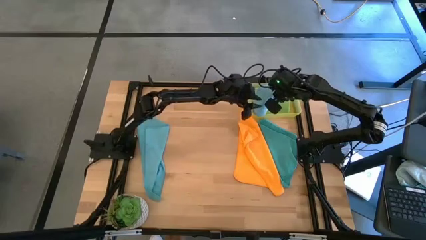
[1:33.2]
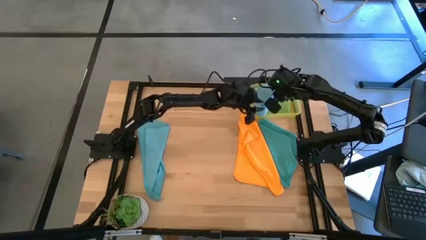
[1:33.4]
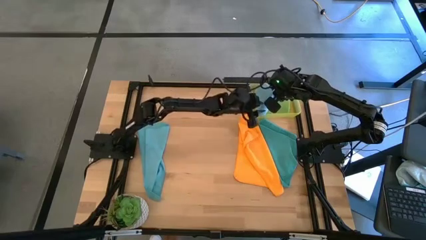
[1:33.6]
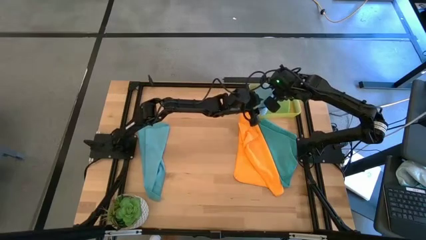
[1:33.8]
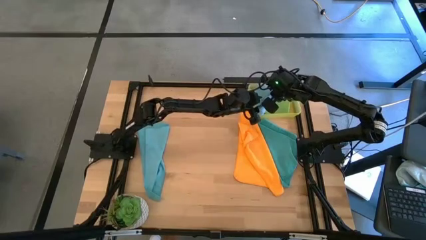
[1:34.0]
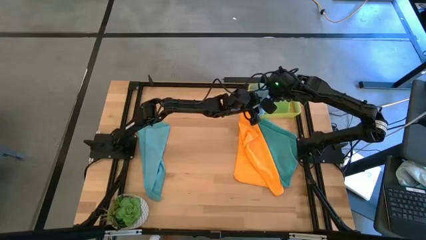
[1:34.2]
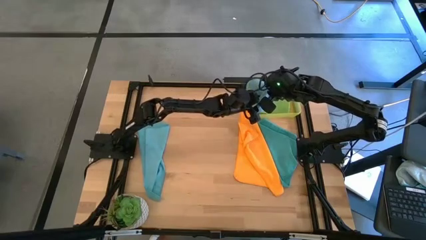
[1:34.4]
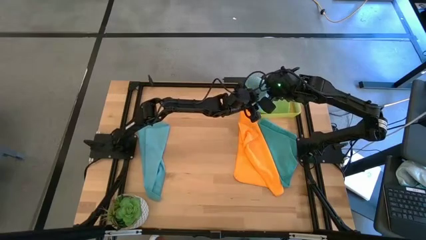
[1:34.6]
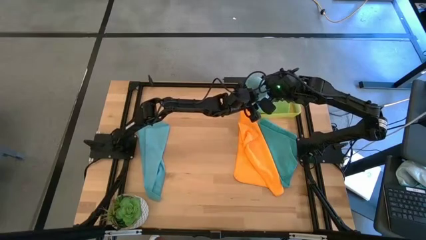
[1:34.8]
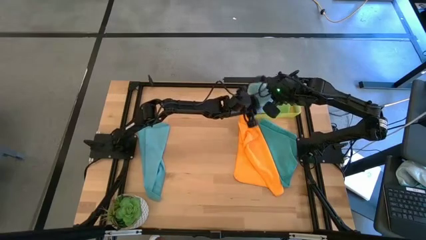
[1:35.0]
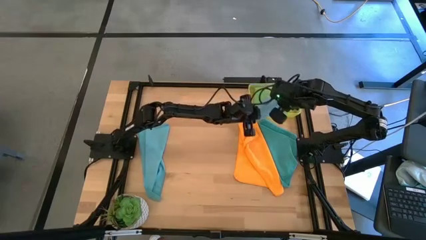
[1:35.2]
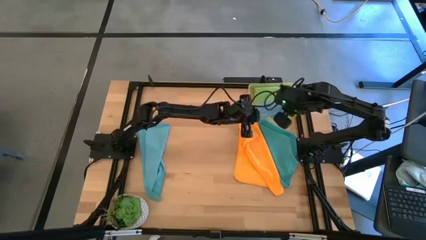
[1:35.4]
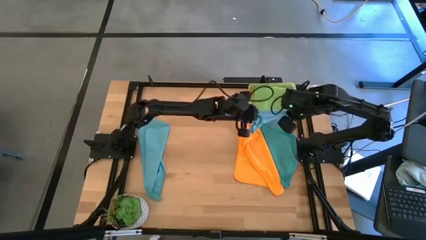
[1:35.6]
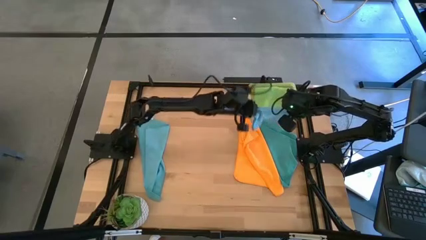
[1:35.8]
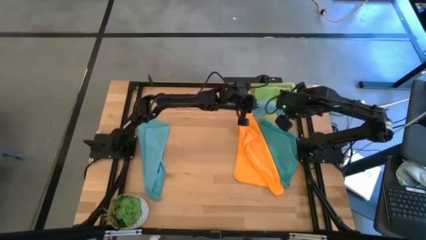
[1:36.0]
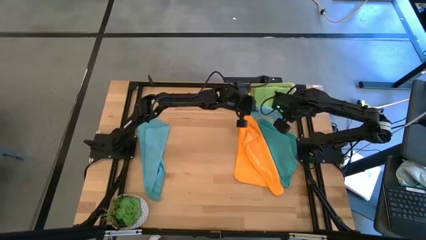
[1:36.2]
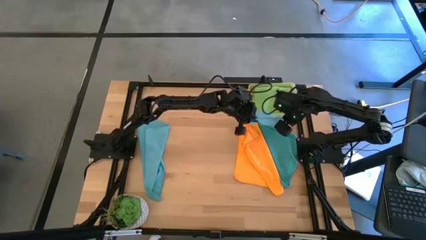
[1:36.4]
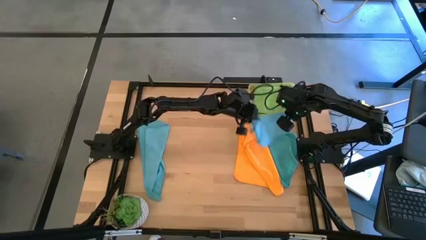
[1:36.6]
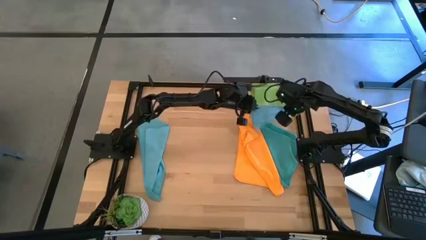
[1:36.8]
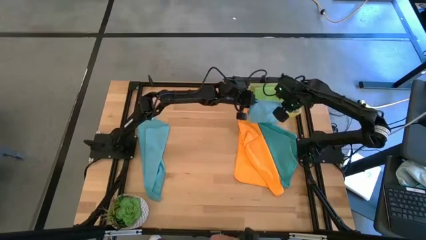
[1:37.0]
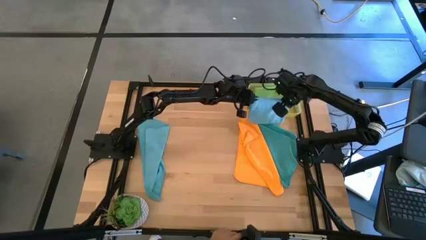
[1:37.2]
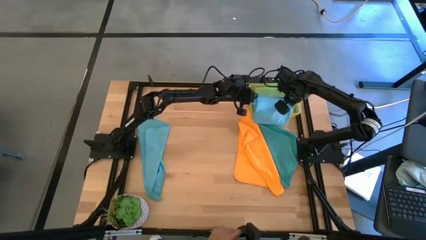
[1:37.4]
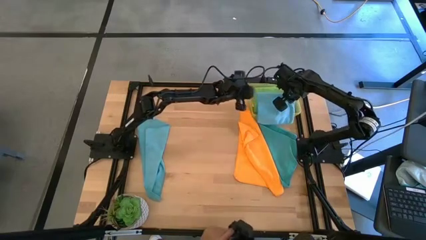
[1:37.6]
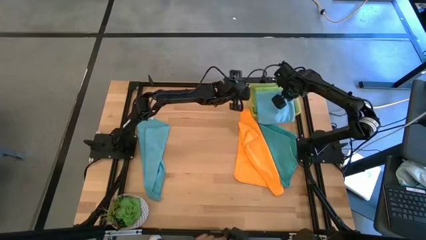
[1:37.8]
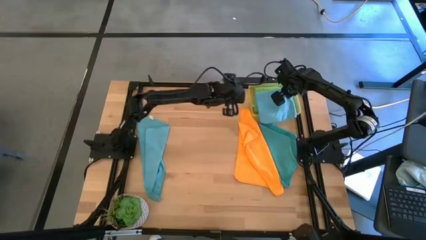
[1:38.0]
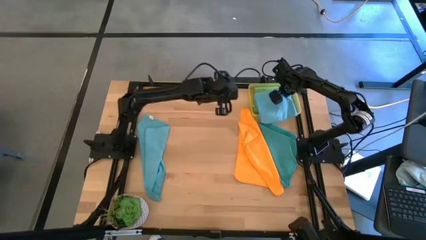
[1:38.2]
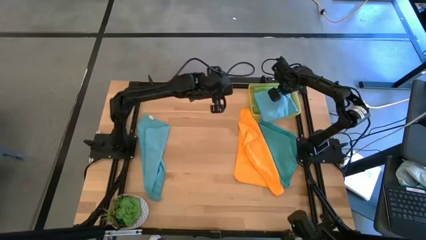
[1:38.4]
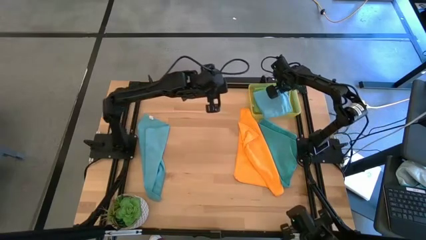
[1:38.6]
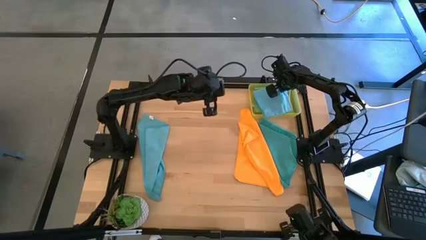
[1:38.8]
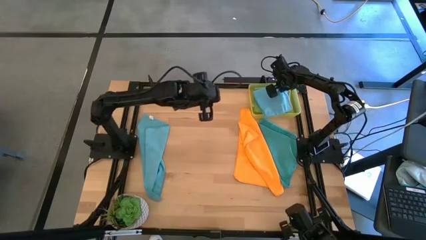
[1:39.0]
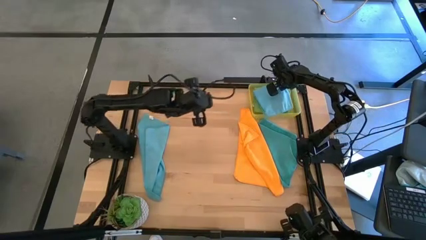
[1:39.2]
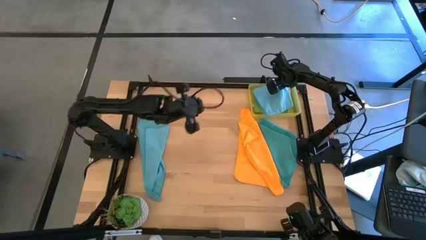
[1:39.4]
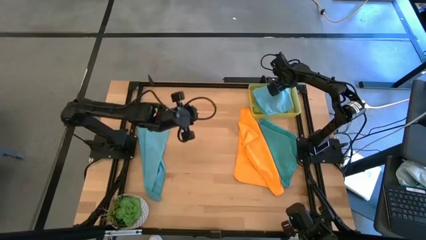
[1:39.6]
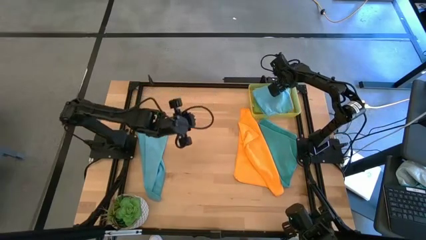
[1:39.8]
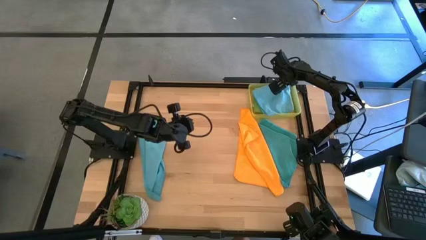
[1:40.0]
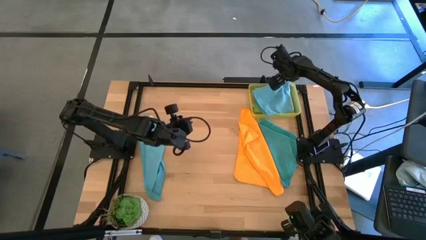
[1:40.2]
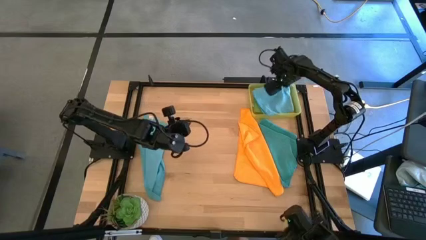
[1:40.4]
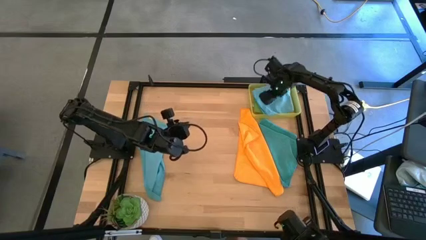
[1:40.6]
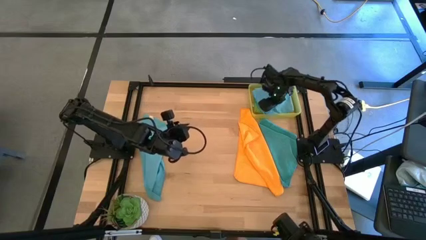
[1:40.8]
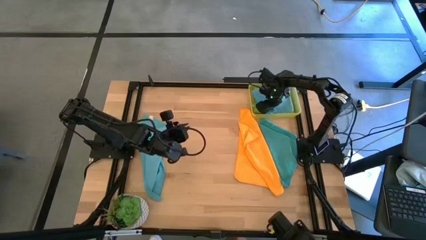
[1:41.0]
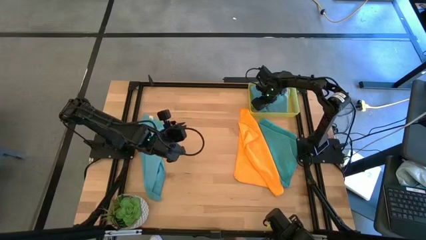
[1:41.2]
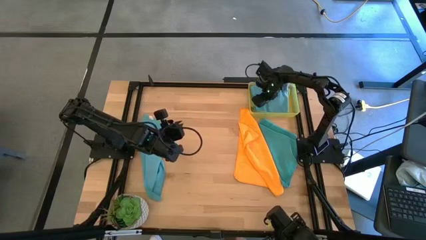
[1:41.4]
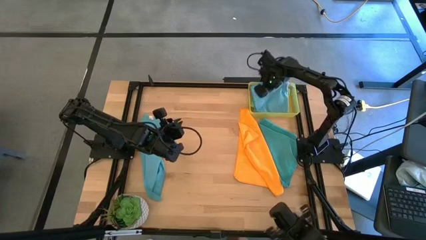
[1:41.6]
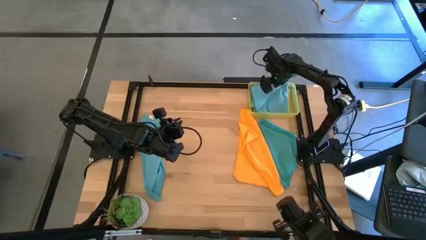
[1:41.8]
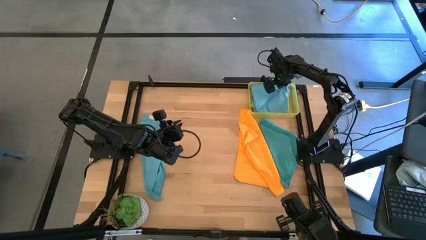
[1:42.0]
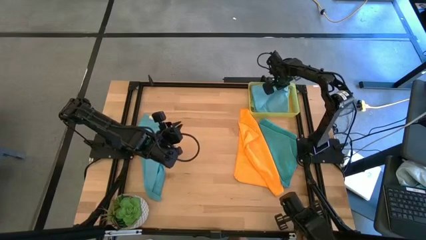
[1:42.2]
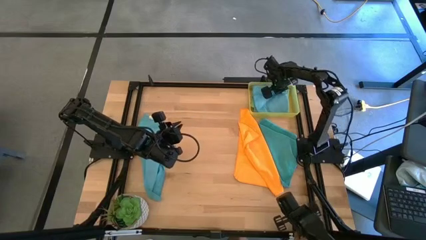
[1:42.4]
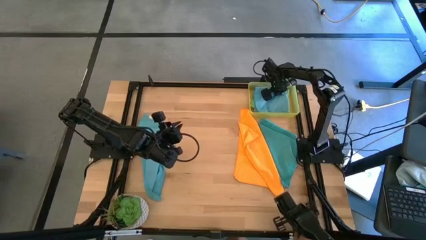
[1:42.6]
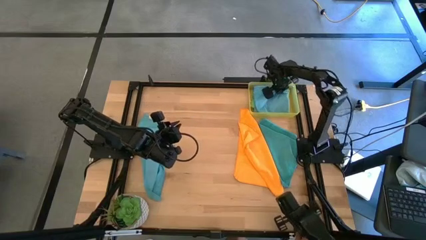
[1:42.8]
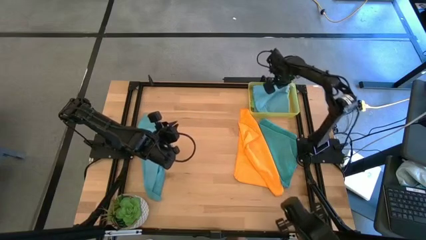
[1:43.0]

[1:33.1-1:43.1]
Task: Fold microfiber towels
Put the folded blue microfiber cloth into the yellow bin

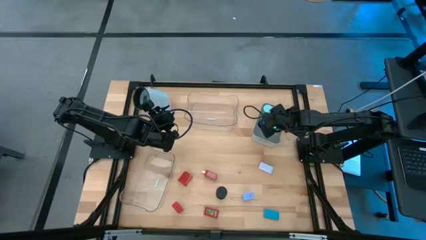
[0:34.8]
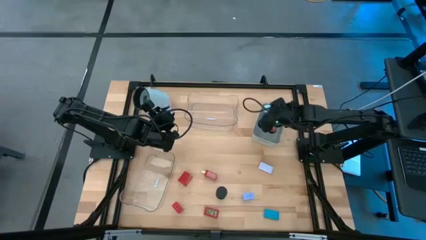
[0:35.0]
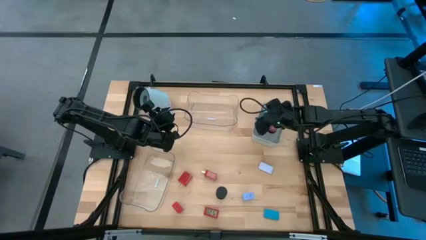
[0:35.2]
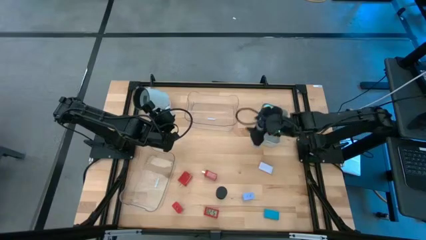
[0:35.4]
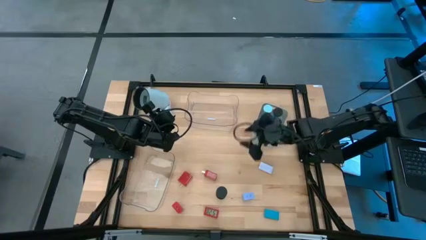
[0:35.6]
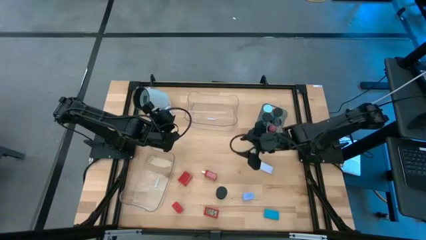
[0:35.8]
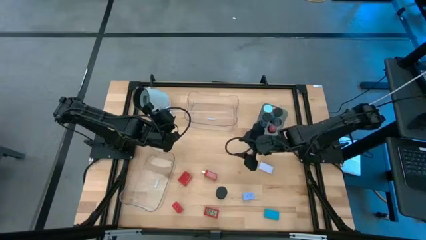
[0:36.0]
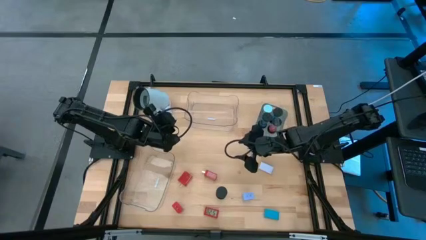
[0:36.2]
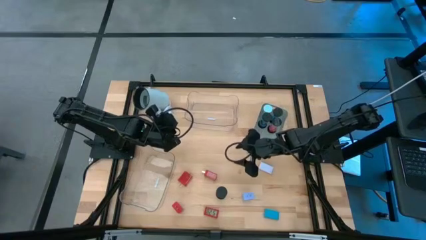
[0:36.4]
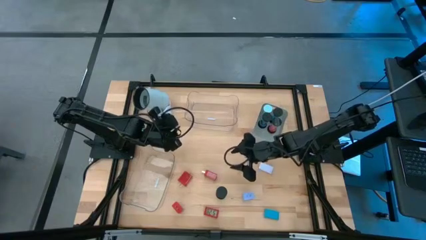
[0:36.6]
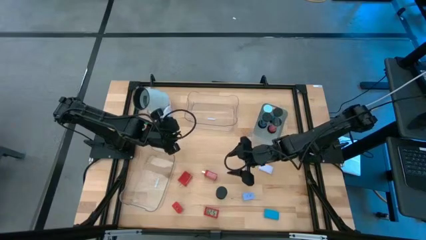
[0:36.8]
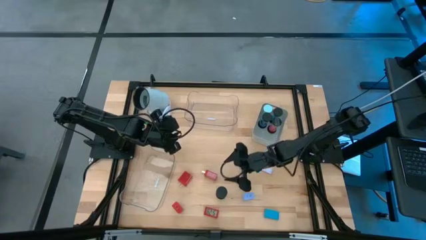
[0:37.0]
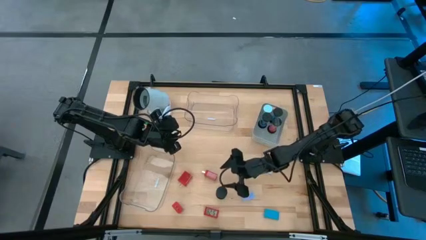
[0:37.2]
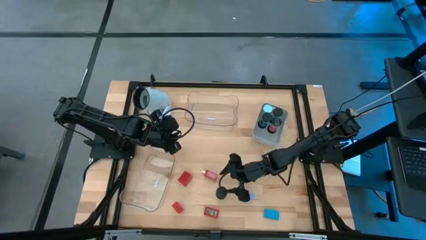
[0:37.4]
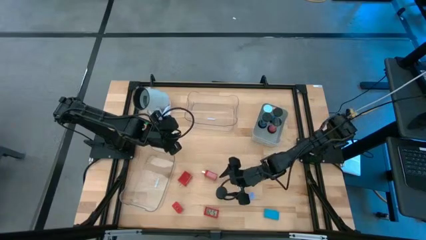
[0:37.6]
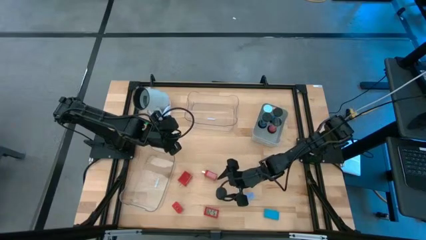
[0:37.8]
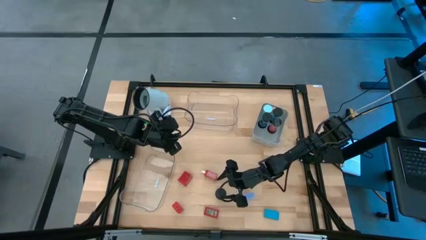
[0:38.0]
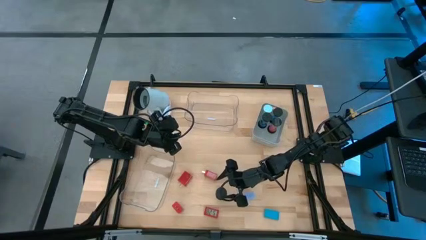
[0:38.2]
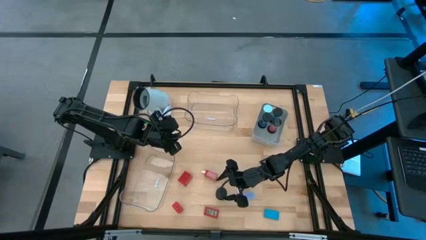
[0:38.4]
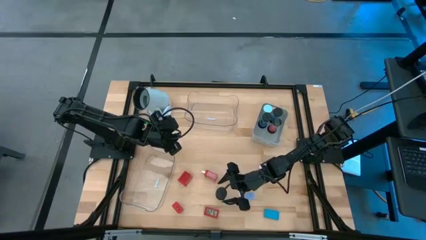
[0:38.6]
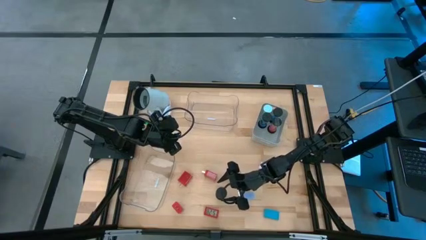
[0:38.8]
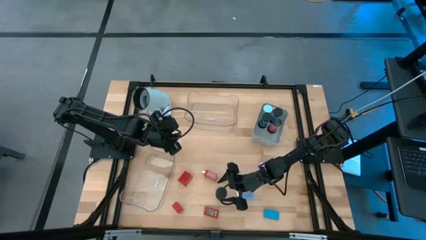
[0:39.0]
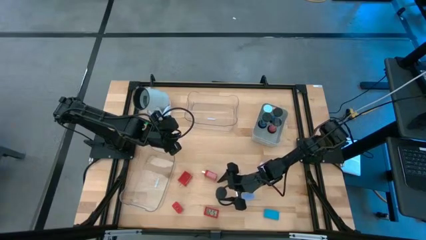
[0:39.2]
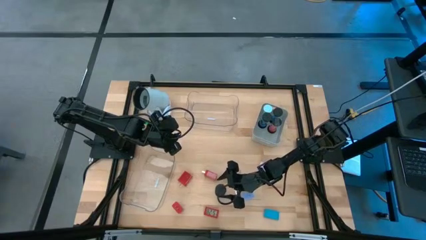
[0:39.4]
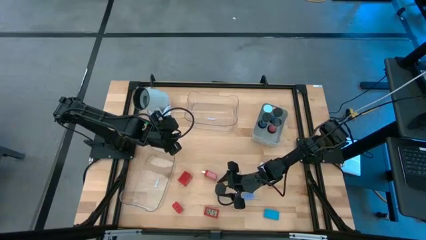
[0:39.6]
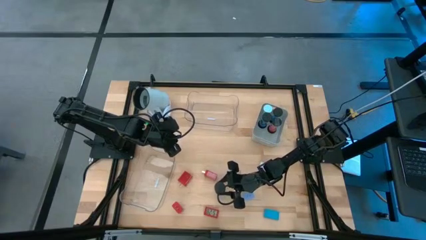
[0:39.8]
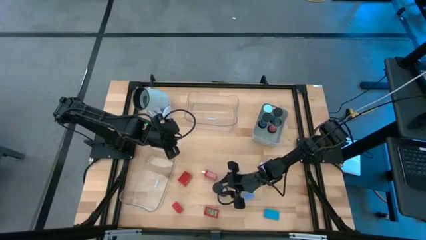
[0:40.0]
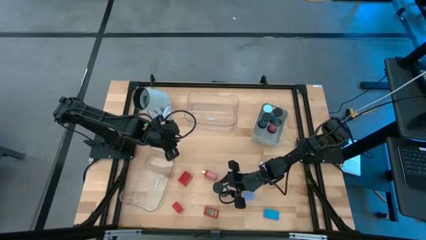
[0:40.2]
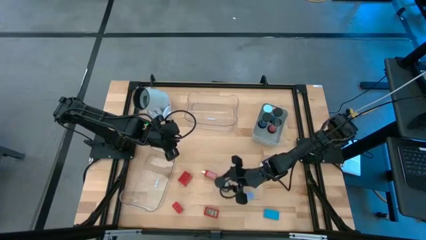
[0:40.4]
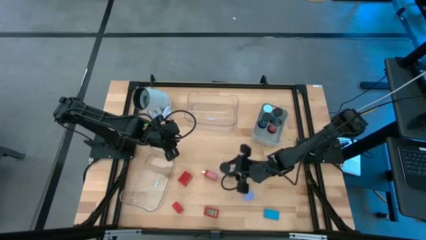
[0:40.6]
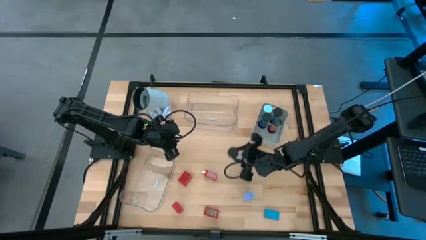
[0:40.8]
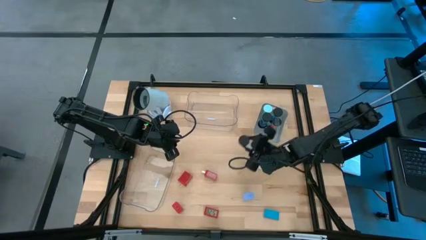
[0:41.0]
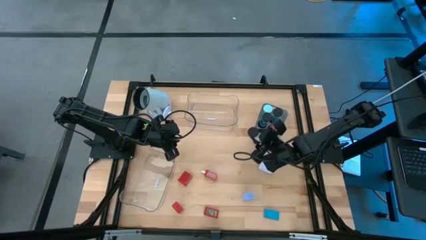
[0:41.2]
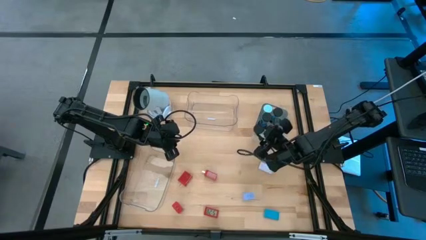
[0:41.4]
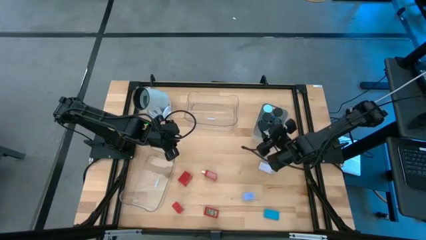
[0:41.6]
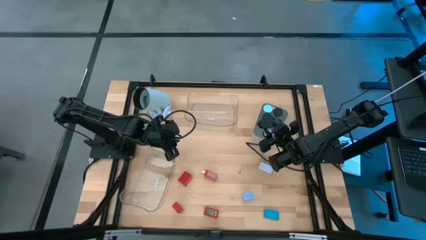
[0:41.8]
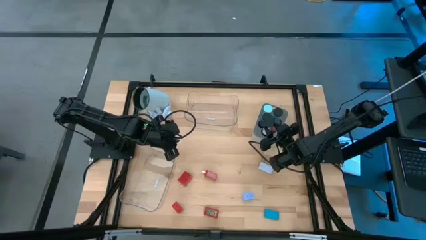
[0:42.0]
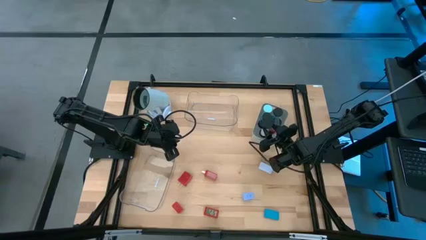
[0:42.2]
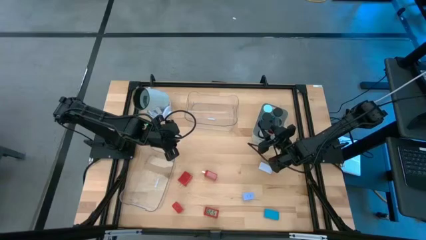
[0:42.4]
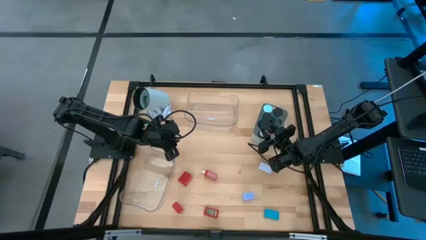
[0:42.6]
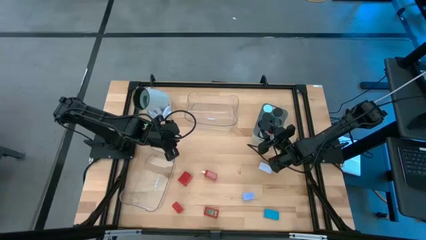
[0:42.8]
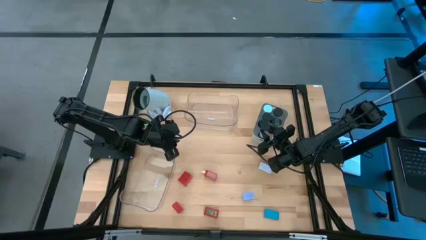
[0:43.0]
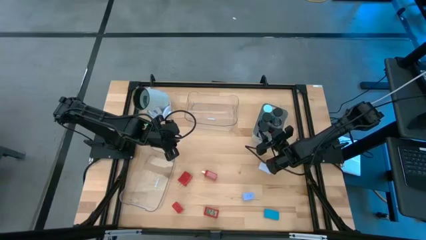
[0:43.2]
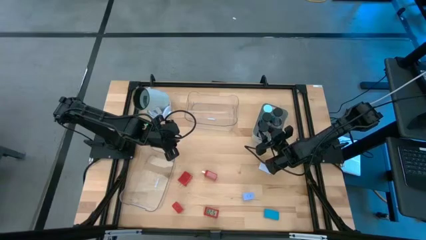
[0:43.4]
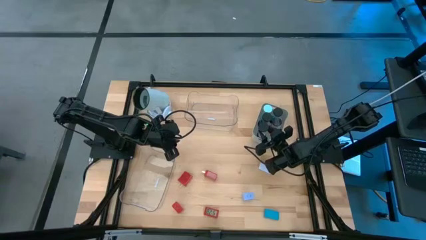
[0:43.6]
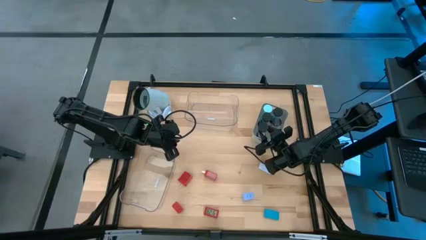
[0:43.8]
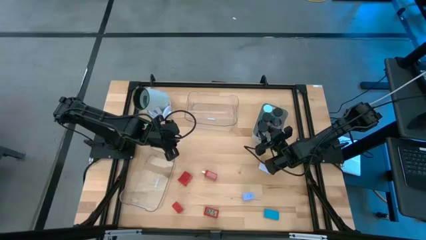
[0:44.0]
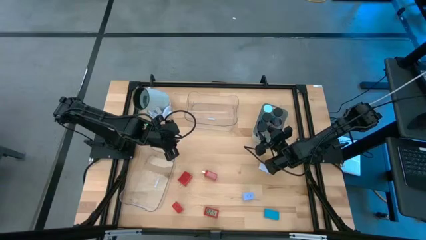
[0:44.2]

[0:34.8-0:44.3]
Task: Pick & Place Office items
Put the white hourglass into the grey bin
